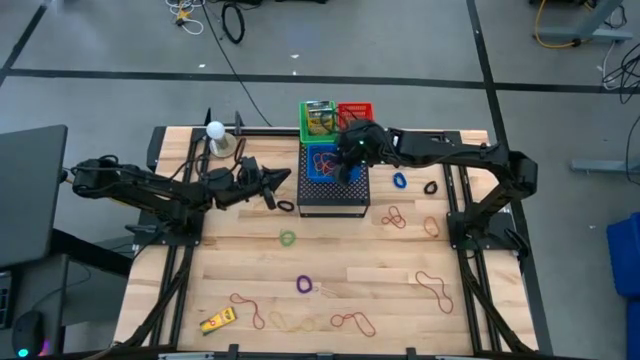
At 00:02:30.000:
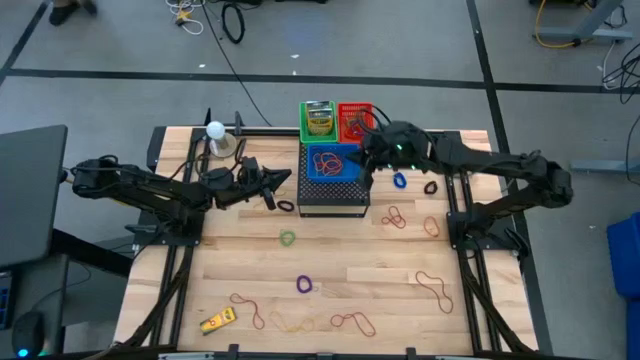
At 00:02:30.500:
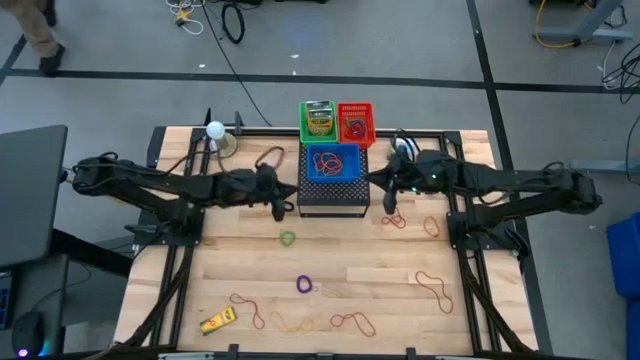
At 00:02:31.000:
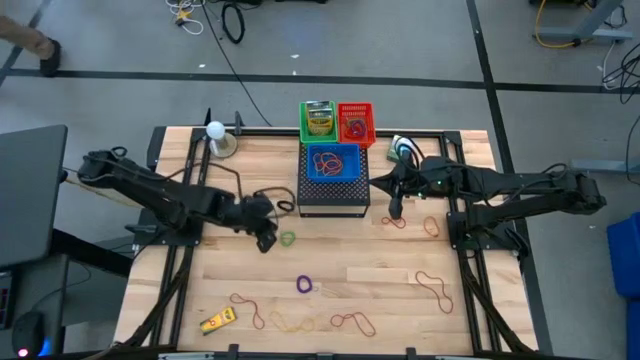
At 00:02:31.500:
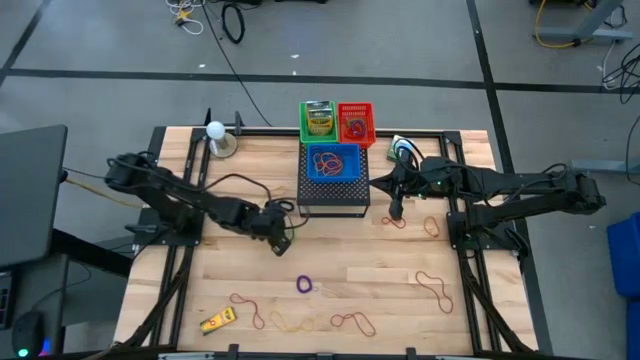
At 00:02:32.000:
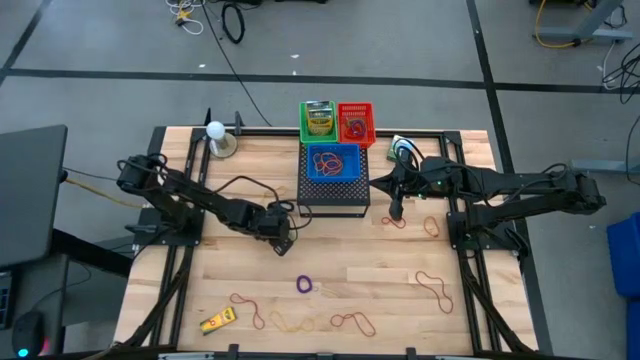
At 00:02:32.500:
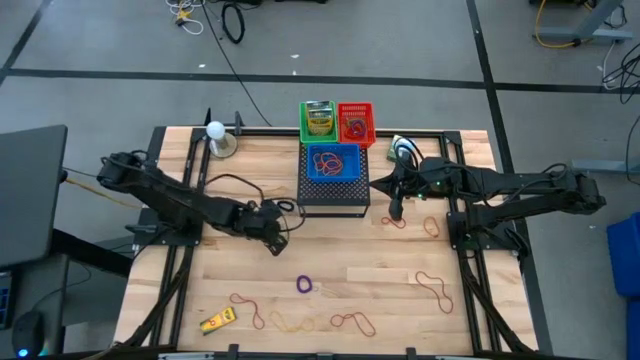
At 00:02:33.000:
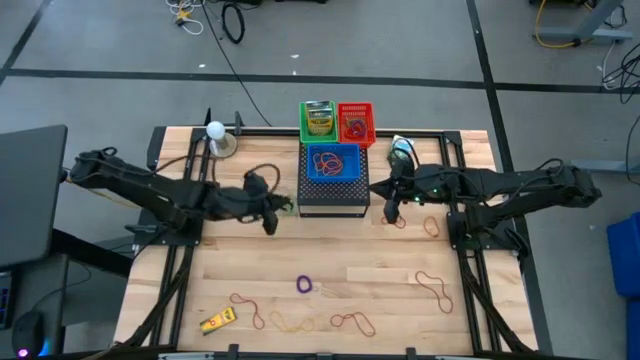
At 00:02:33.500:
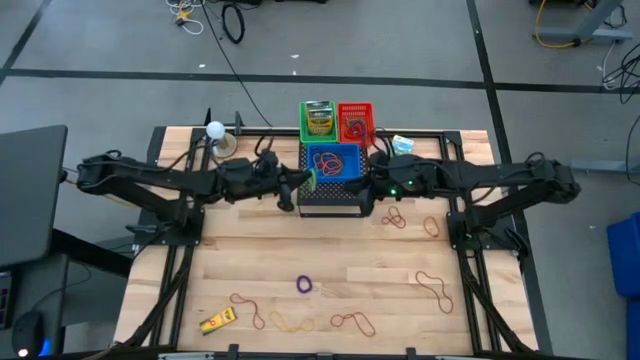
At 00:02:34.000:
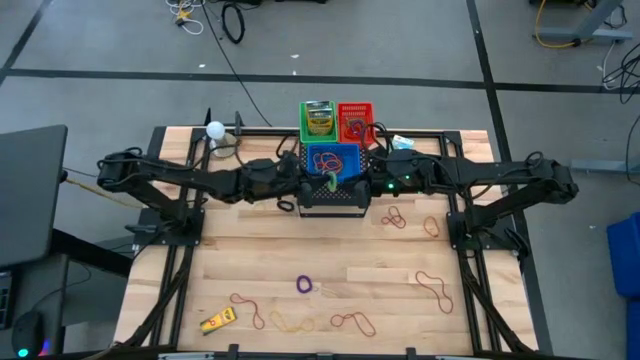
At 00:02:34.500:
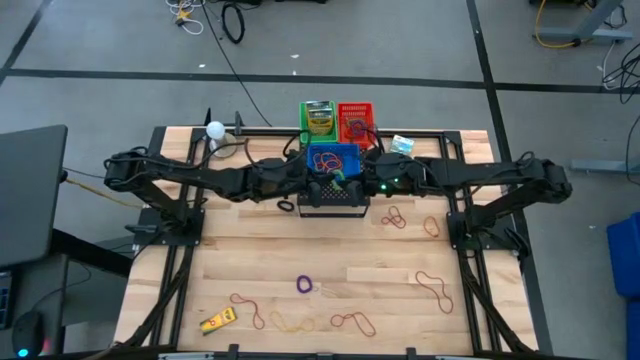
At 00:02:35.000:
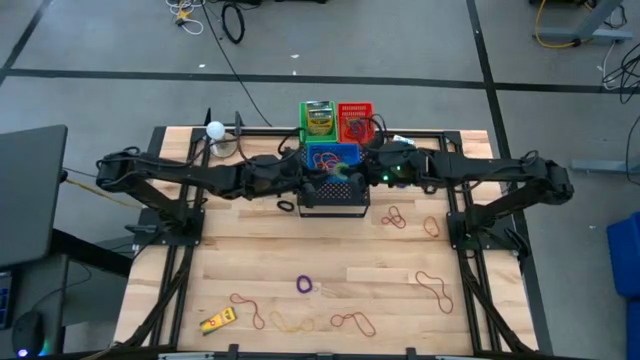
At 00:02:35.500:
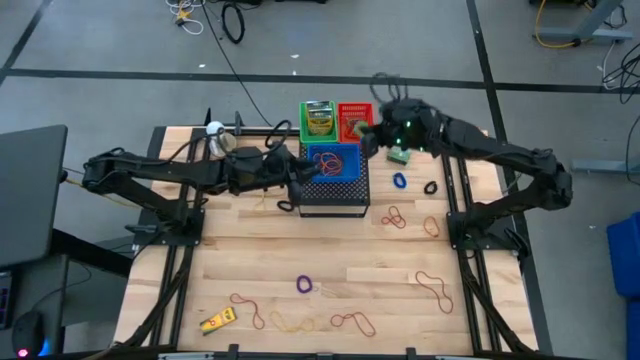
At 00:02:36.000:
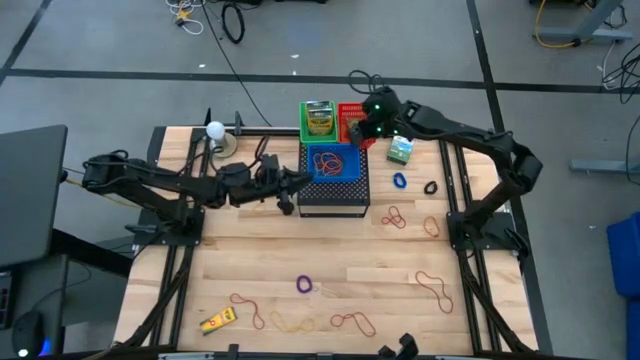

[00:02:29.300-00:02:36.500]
Task: Pick & Place Office Desk Supplies
Put the green spring keychain into the red bin on the shelf

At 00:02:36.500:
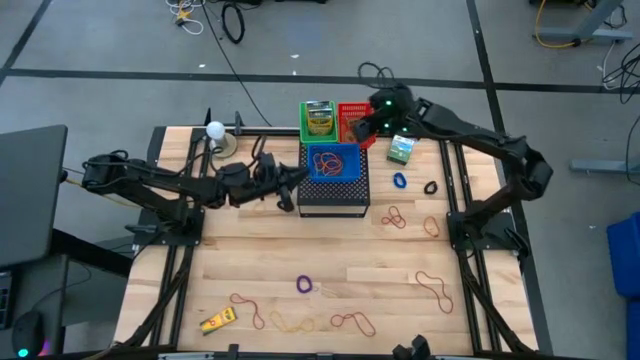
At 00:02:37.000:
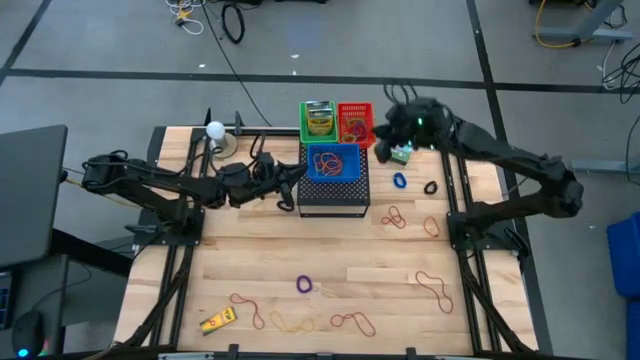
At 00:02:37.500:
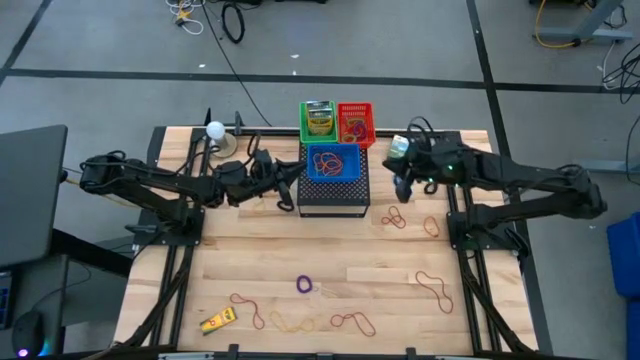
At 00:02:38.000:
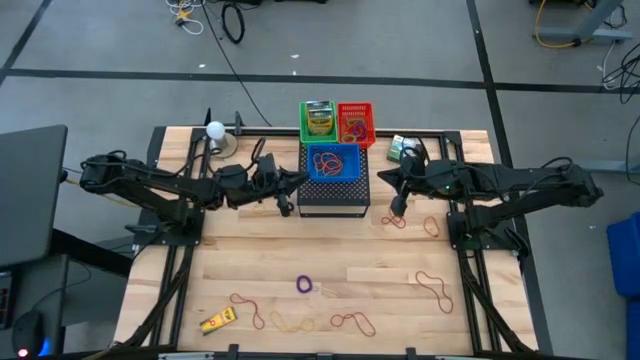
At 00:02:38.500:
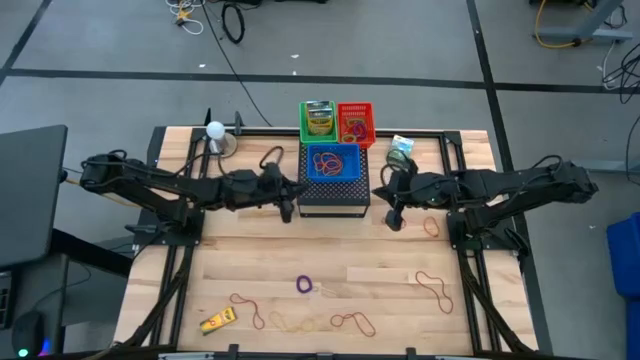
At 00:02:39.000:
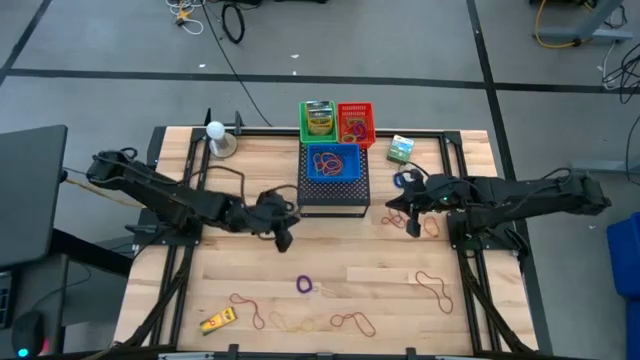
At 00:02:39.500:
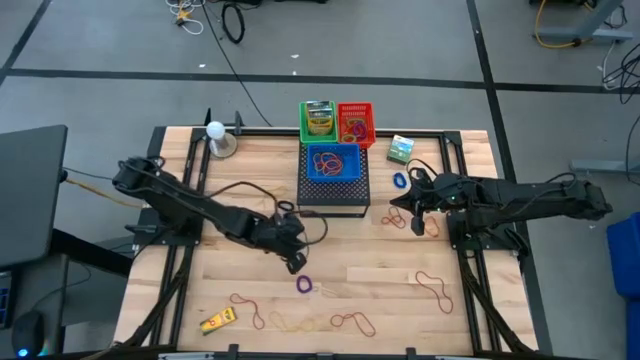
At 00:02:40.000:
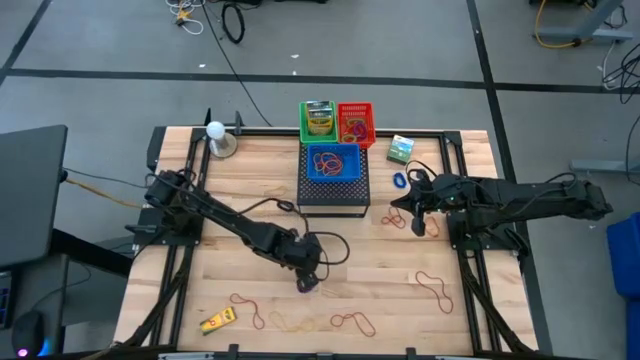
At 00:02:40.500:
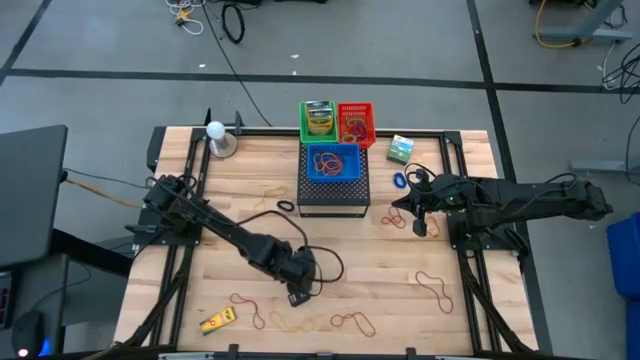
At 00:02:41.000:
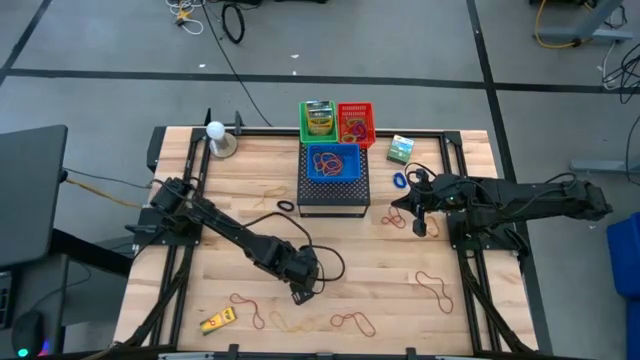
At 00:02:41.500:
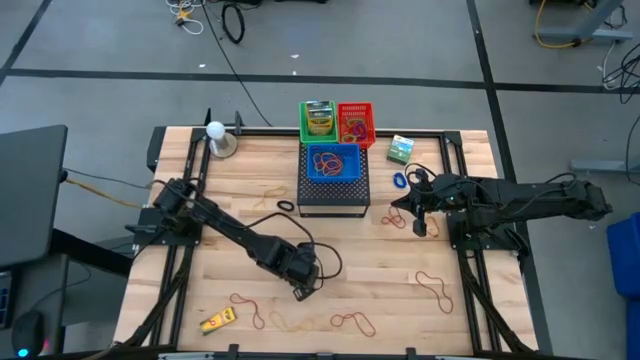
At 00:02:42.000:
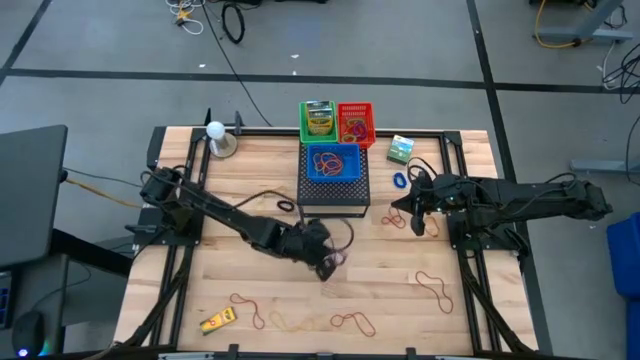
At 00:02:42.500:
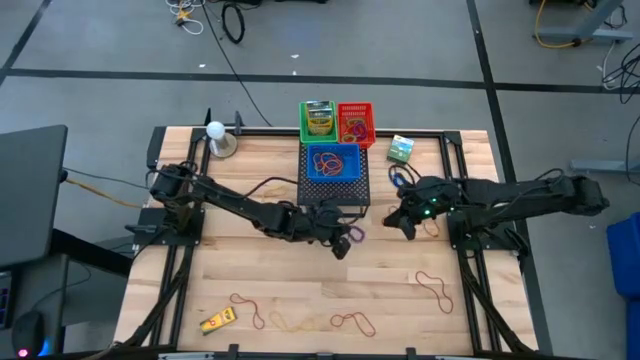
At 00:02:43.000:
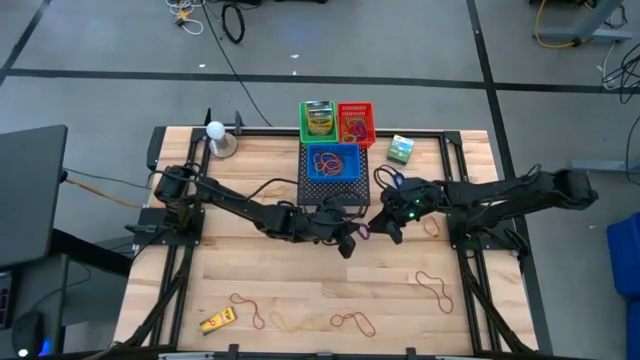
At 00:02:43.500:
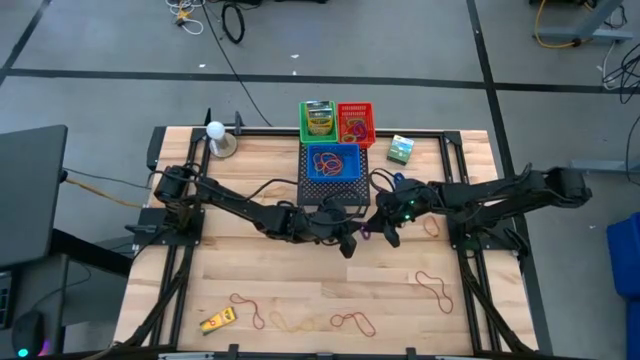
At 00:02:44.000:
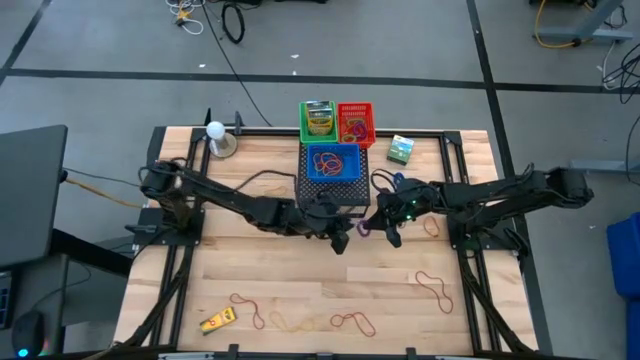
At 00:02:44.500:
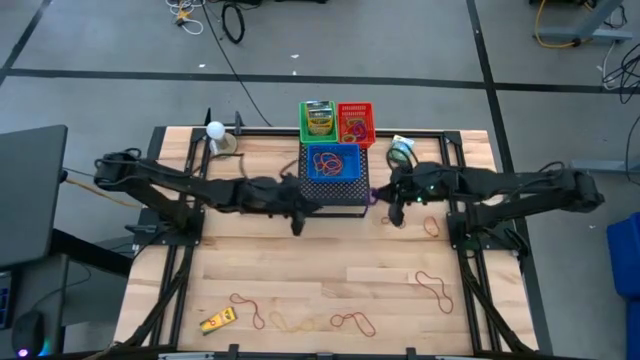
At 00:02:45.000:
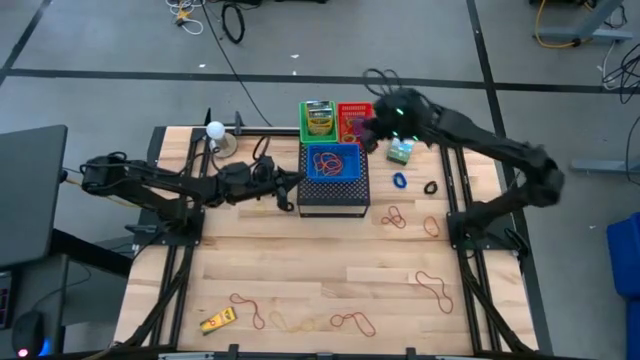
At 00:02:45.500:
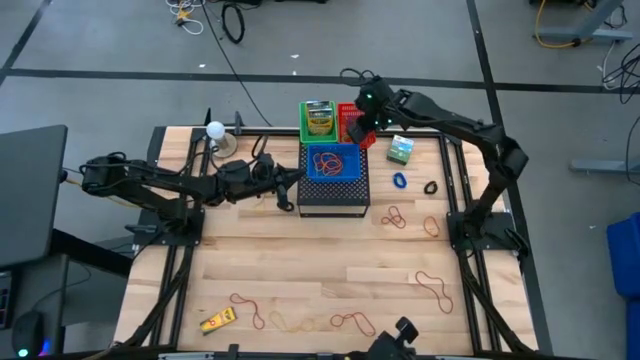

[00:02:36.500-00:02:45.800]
Put the purple spring keychain into the red bin on the shelf

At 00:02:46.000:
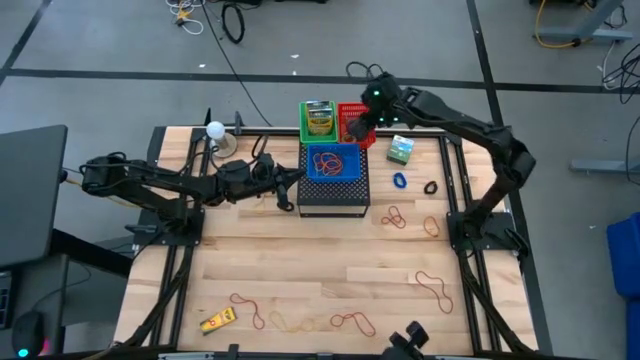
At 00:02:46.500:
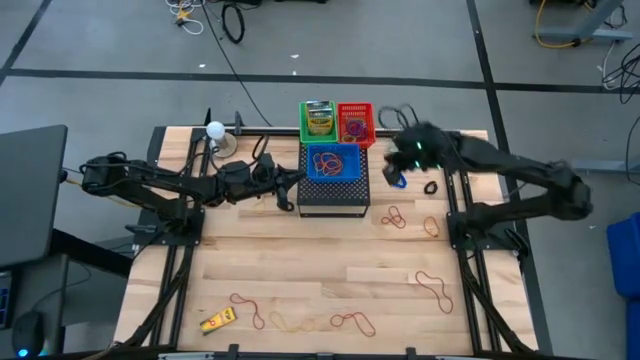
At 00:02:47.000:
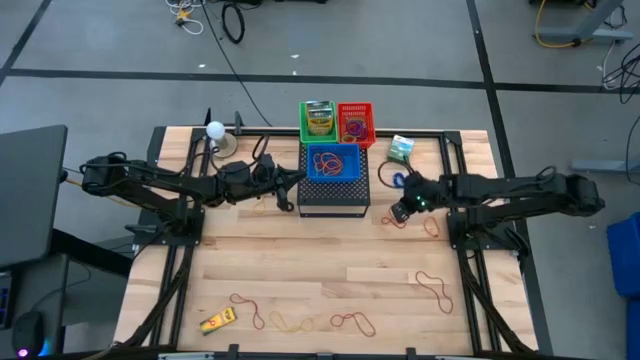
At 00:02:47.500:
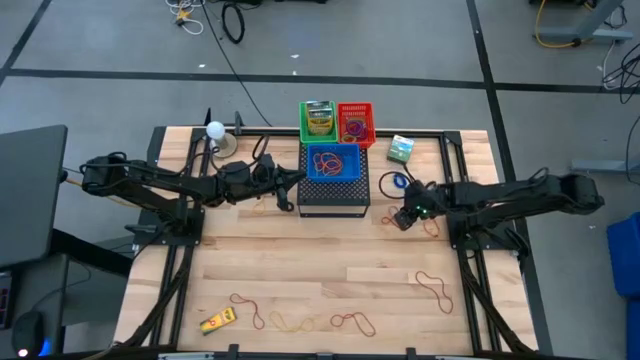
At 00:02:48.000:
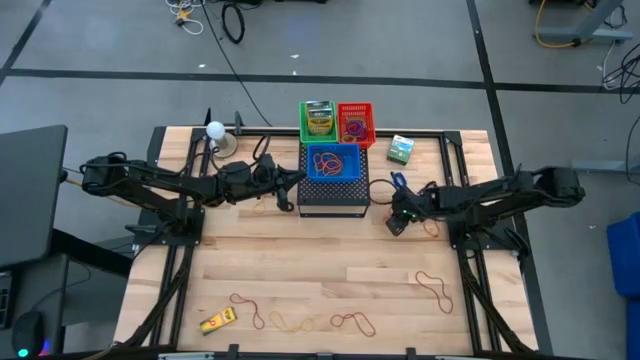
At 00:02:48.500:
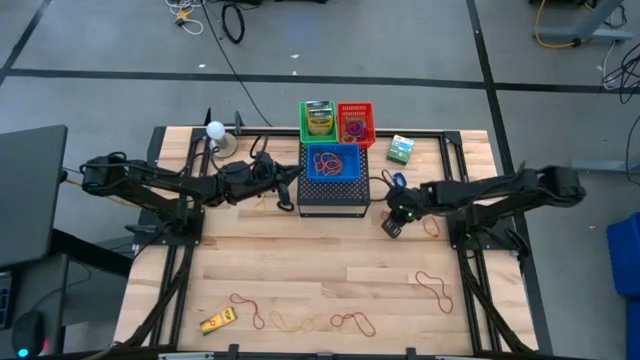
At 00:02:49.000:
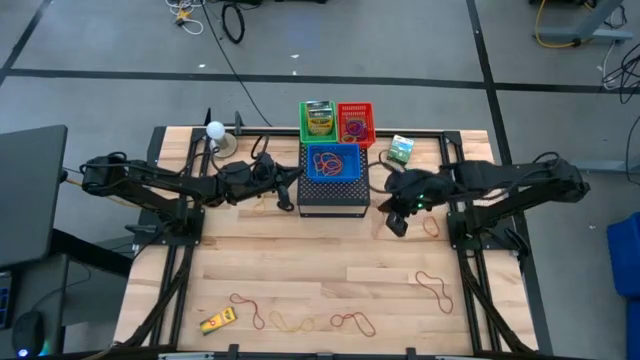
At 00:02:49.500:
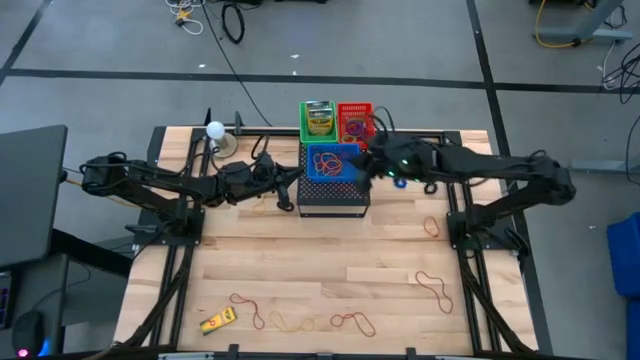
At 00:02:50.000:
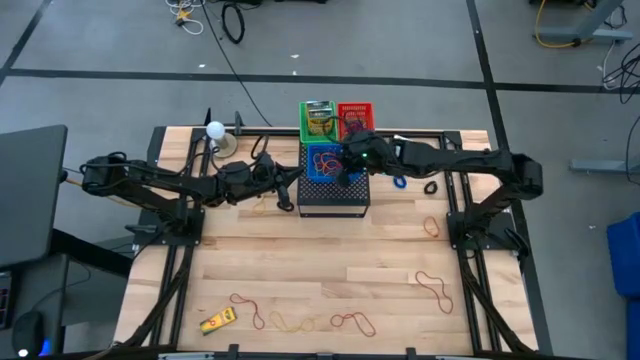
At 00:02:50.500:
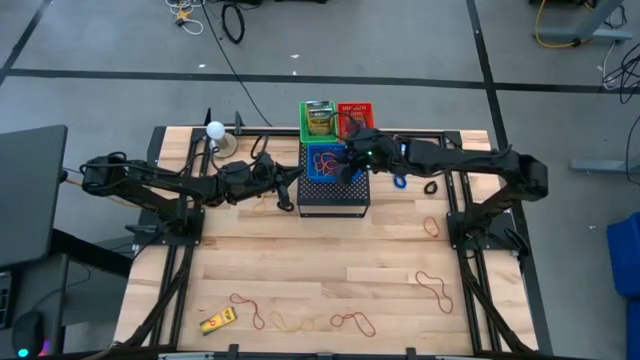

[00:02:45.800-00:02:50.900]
Put the red rubber band into the blue bin on the shelf
